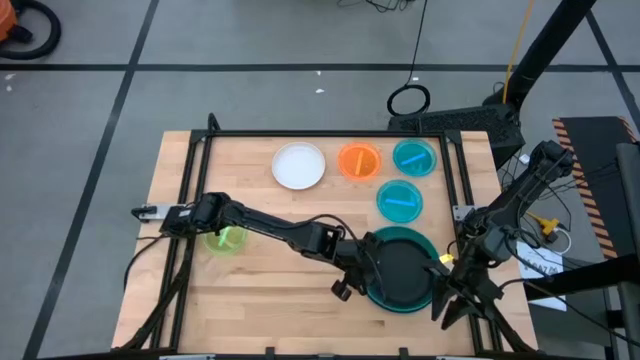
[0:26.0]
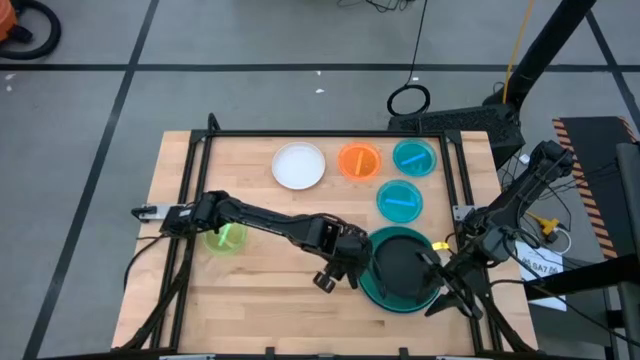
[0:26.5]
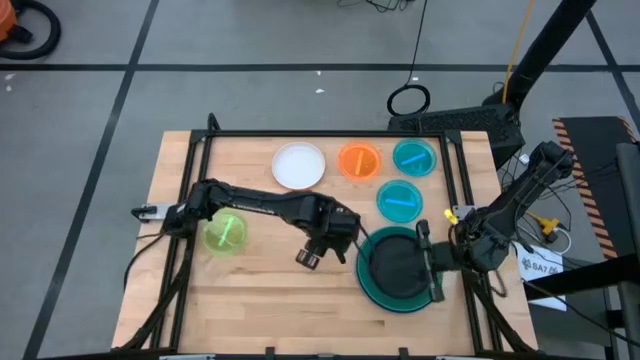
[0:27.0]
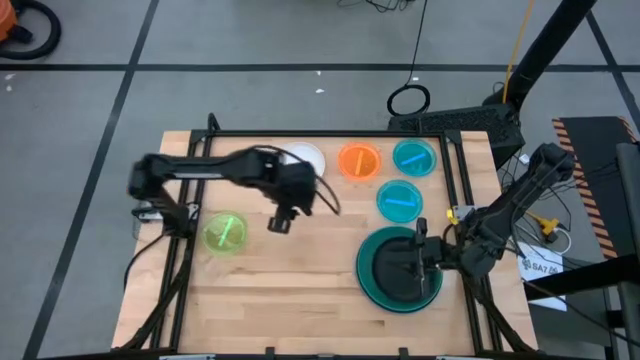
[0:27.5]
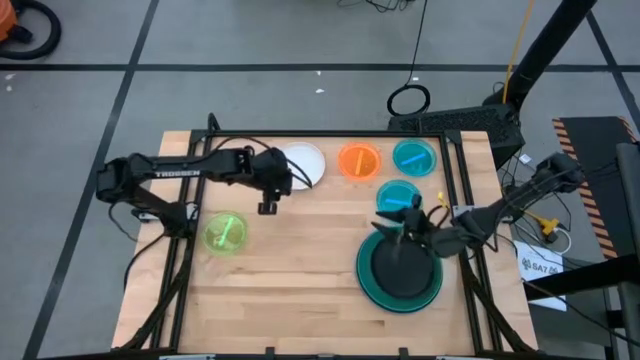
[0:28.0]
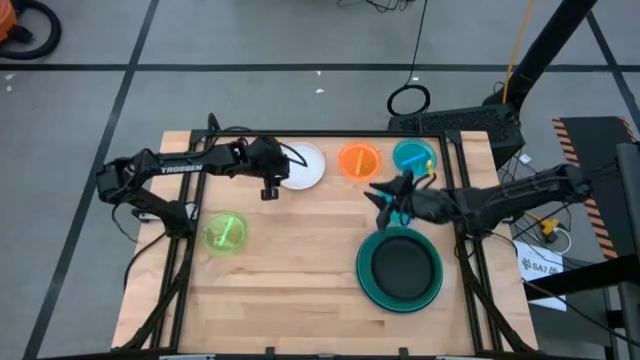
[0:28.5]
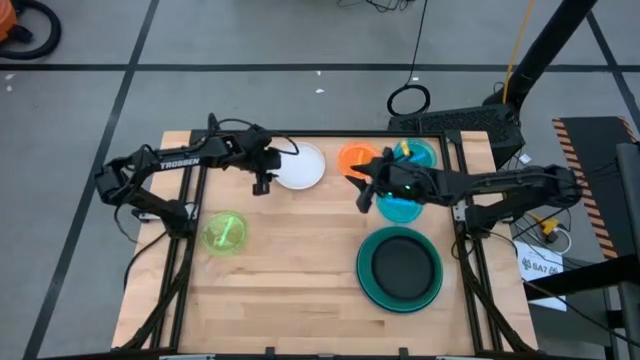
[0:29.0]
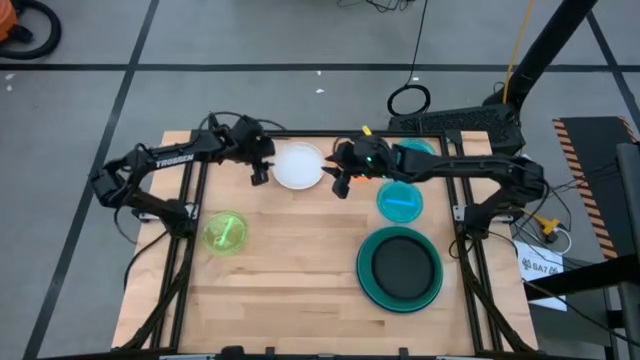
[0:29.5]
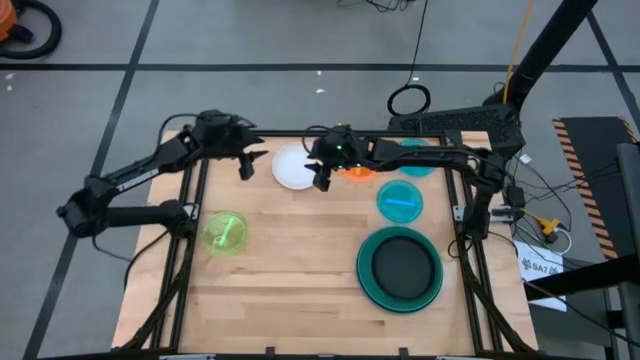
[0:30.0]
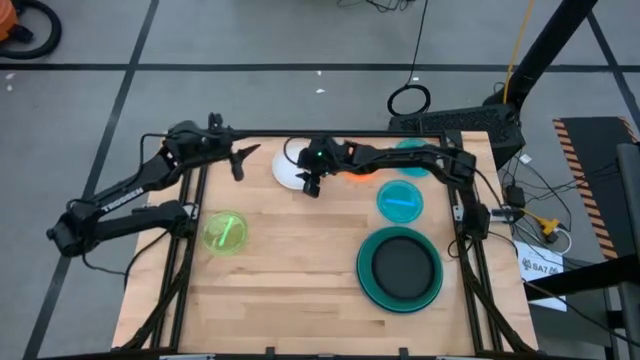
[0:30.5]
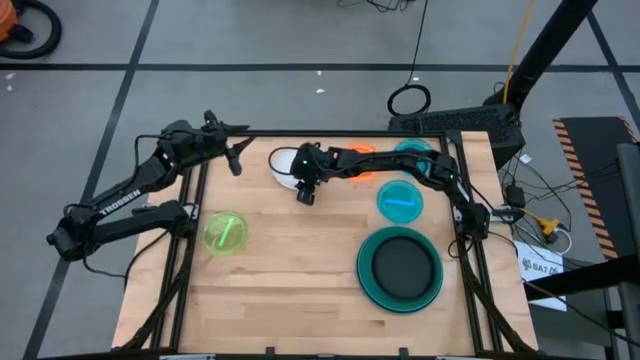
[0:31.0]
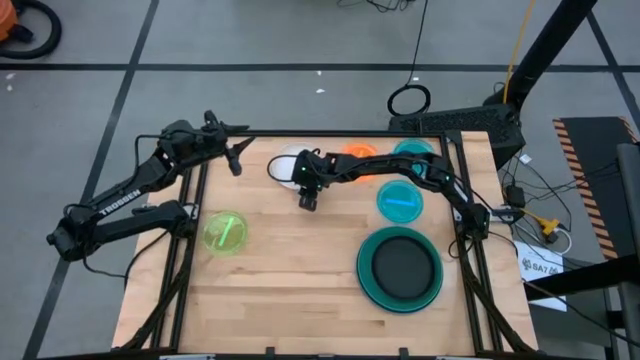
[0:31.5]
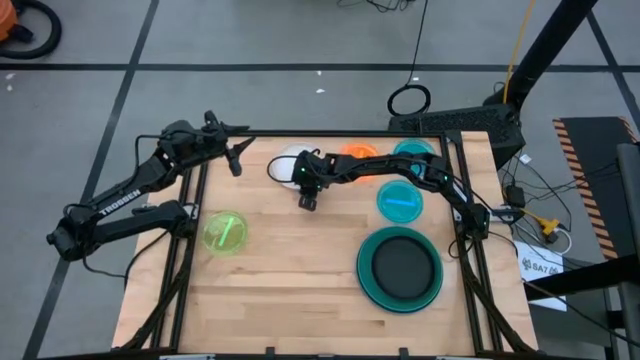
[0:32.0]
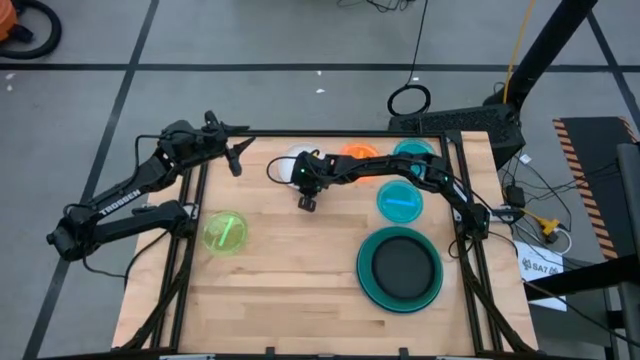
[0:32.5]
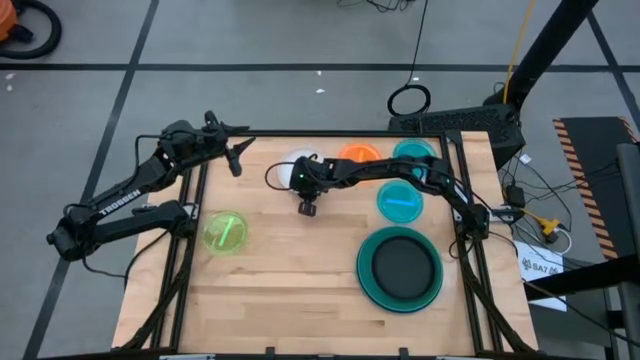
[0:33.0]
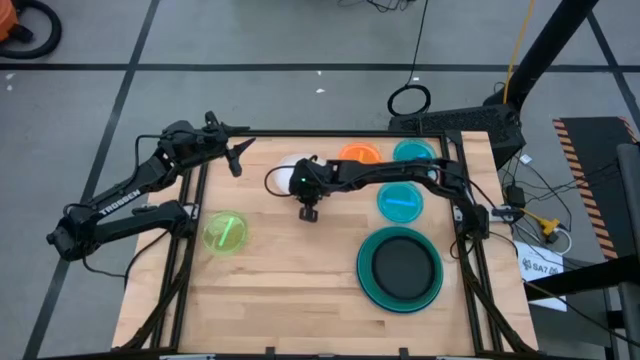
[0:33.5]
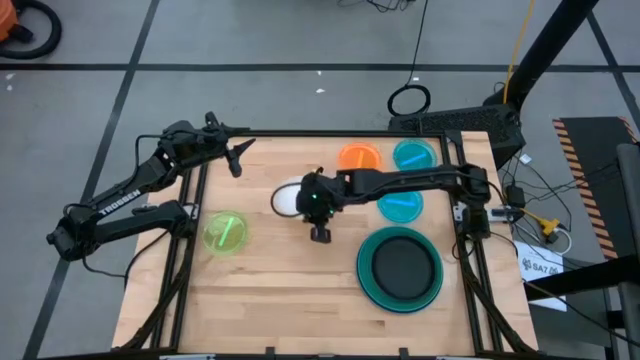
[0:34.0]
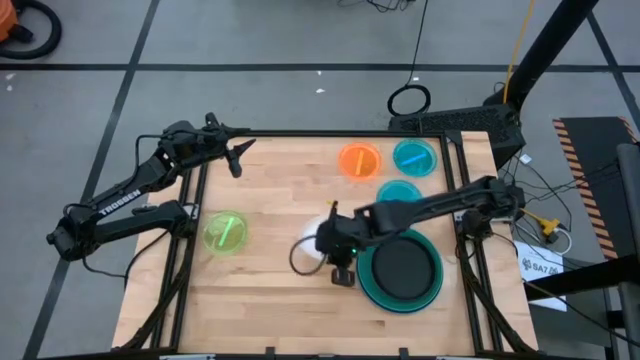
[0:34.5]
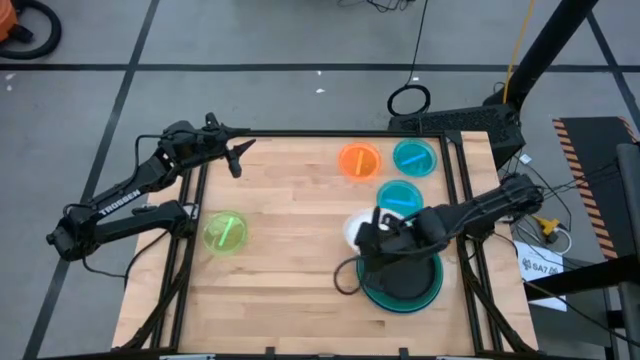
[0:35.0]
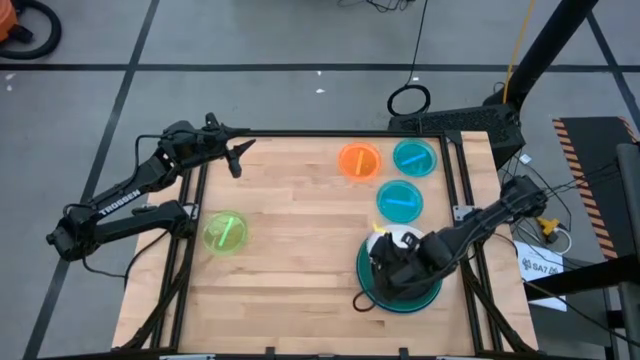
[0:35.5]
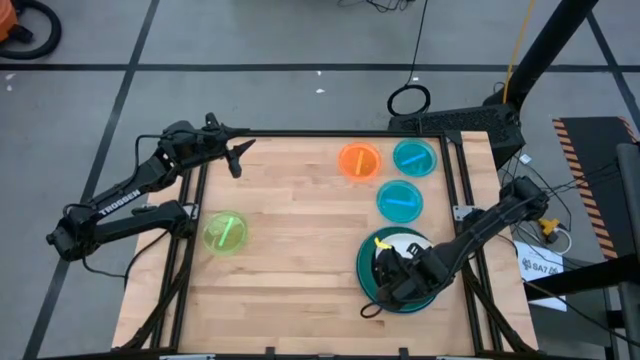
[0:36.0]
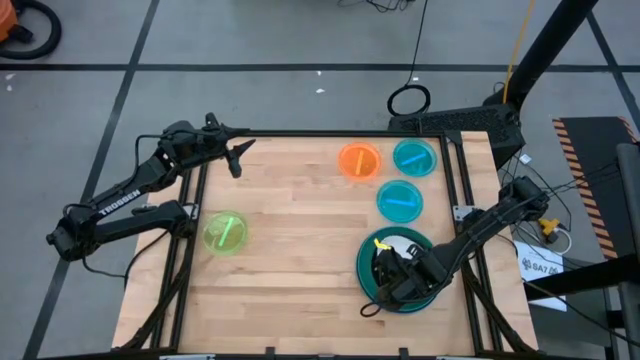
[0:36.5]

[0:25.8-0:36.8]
Task: Stack plastic plates
Stack the white plate on top of the black plate

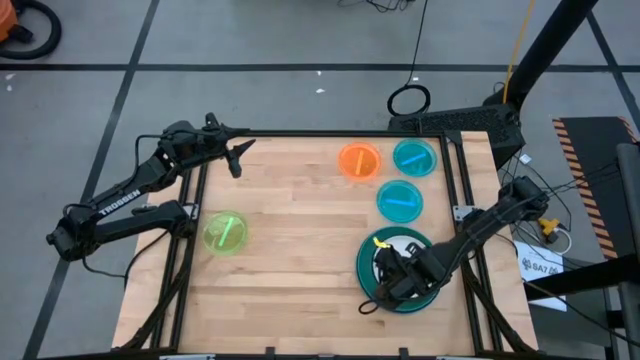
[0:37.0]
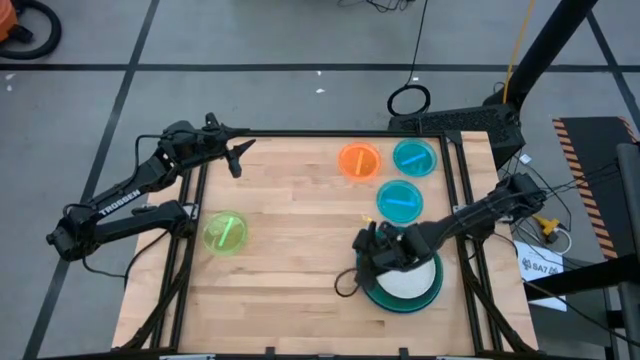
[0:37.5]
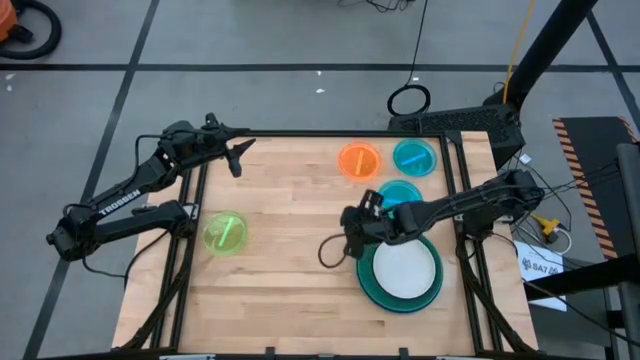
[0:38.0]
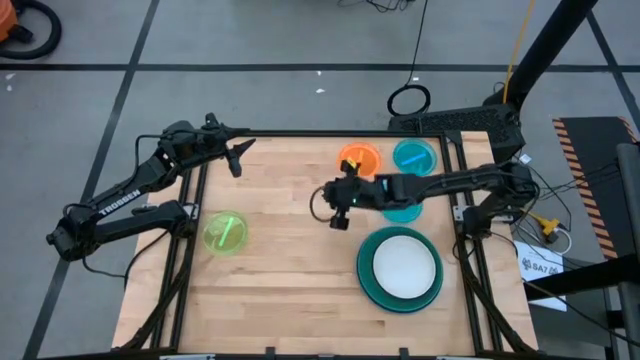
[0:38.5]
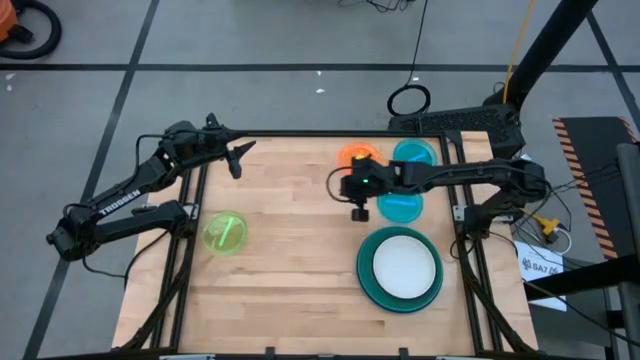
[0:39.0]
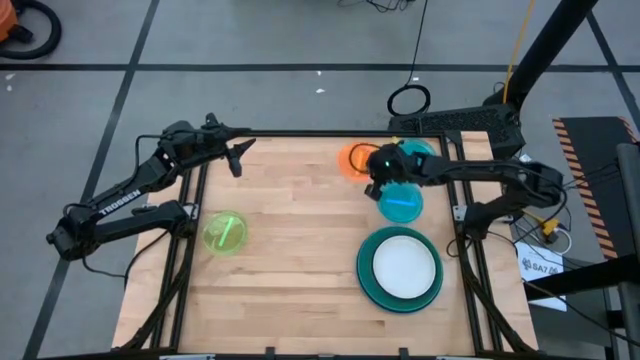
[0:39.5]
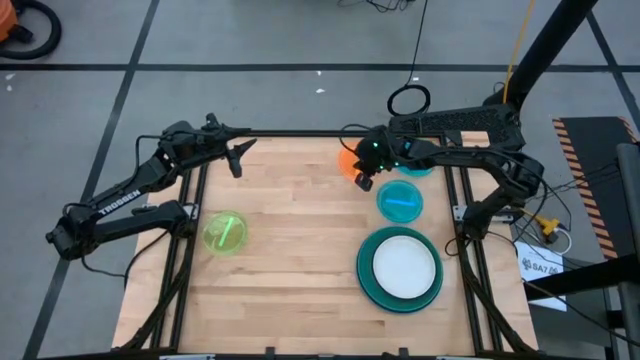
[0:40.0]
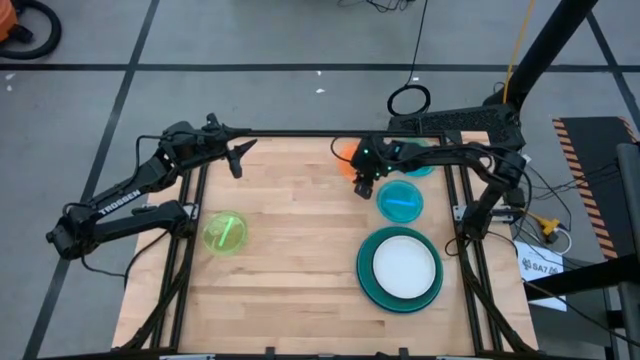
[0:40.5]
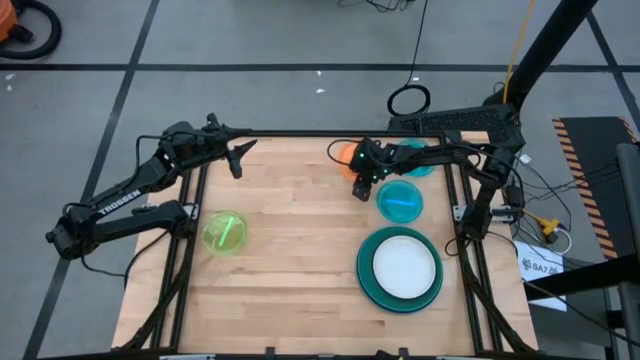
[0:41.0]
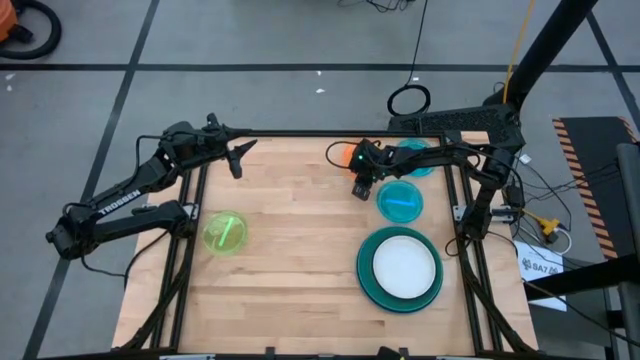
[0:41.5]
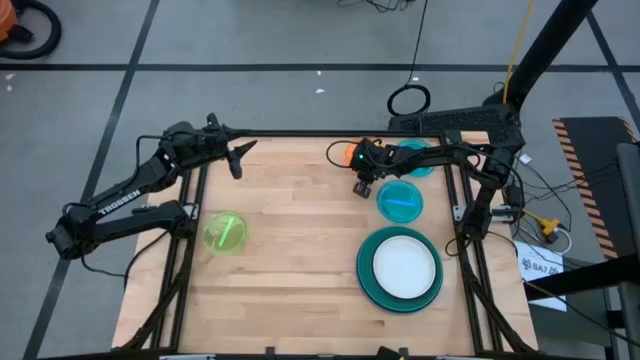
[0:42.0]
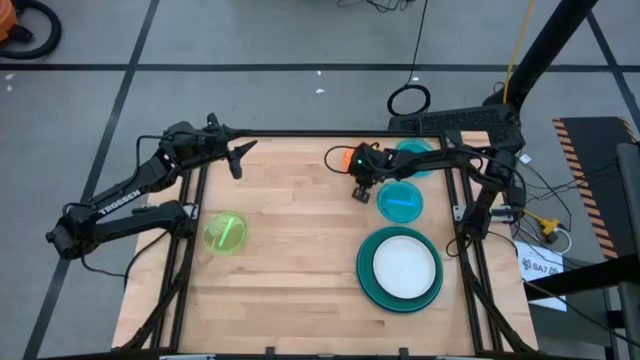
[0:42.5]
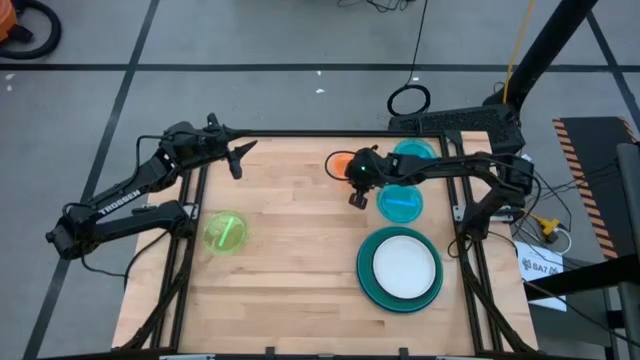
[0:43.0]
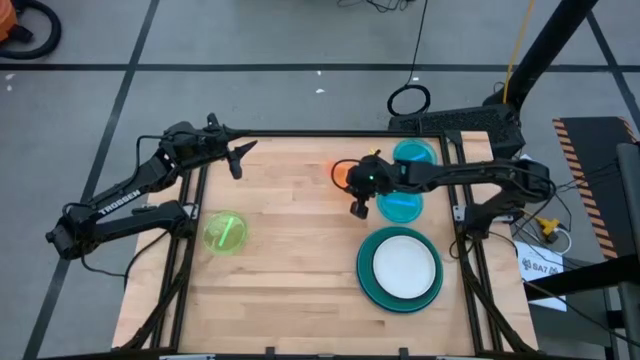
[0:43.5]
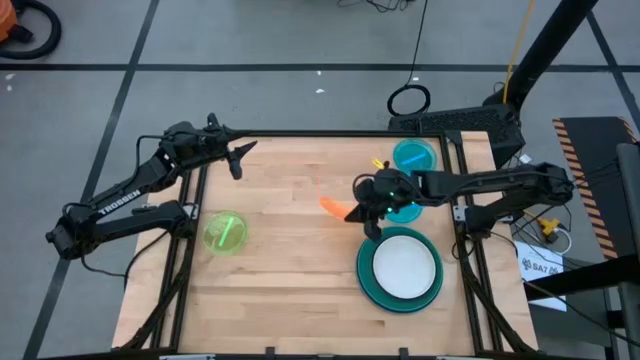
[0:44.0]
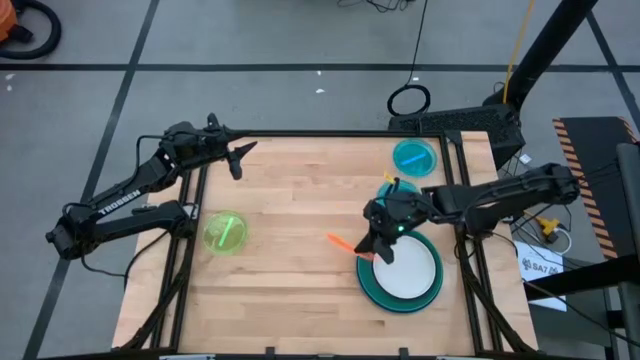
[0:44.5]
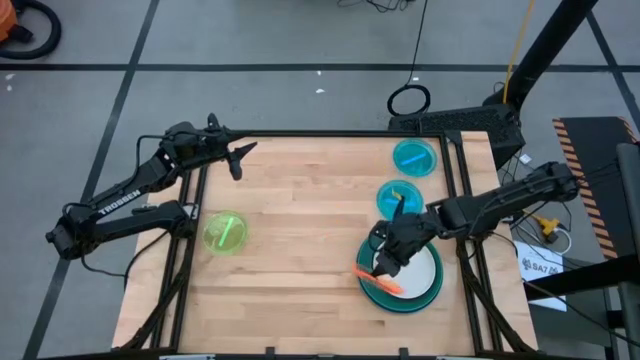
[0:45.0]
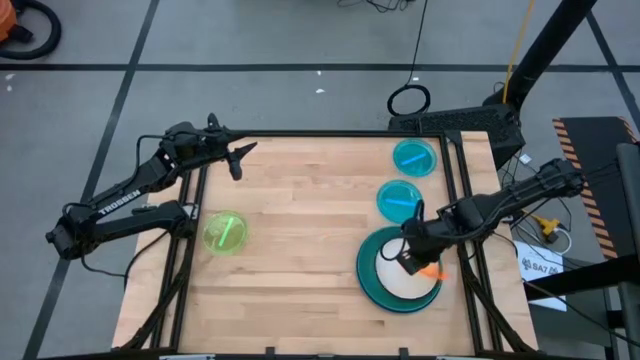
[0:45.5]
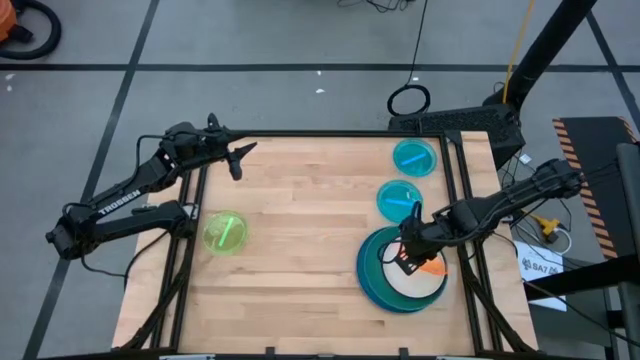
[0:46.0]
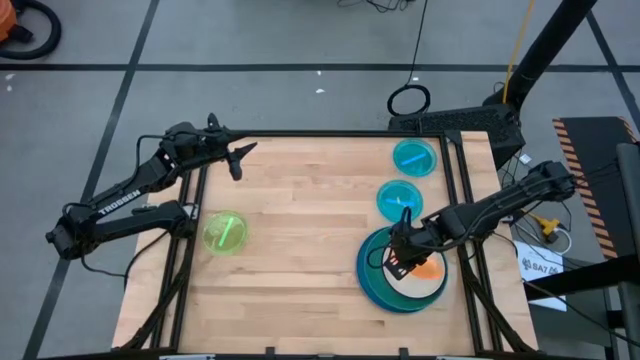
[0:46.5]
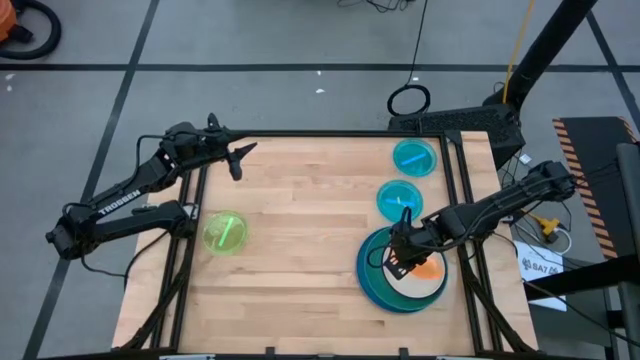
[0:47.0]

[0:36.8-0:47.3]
Stack the orange plate on top of the white plate
